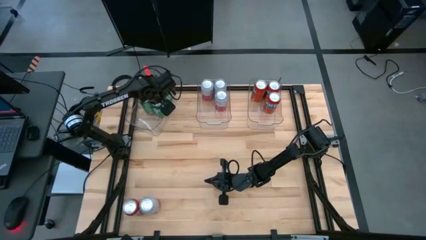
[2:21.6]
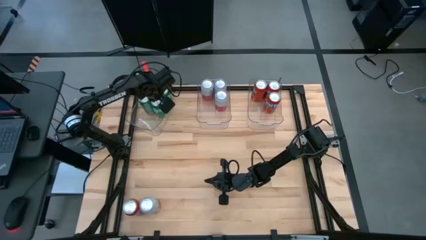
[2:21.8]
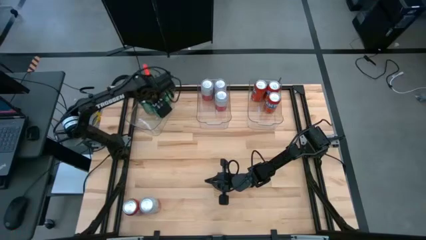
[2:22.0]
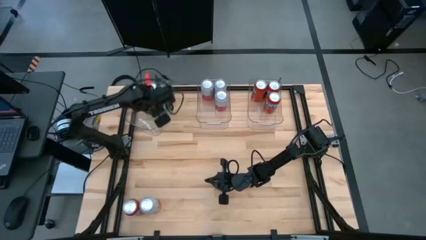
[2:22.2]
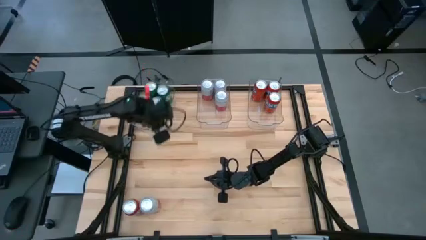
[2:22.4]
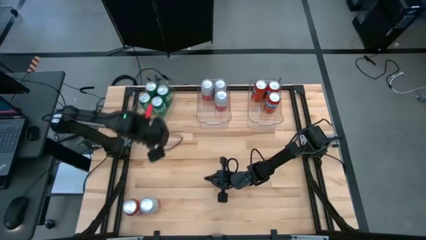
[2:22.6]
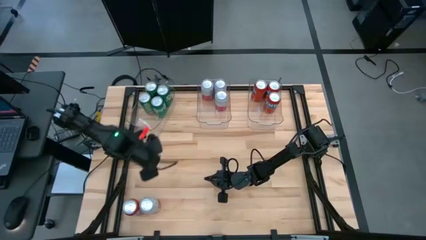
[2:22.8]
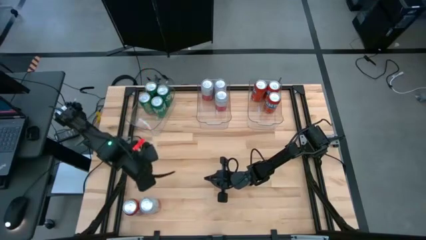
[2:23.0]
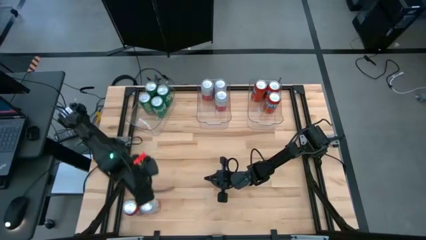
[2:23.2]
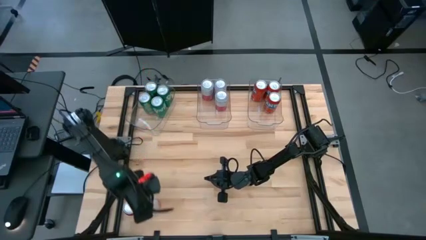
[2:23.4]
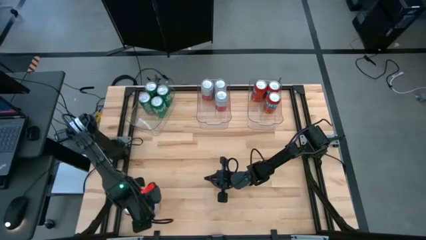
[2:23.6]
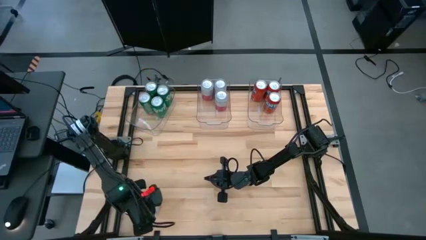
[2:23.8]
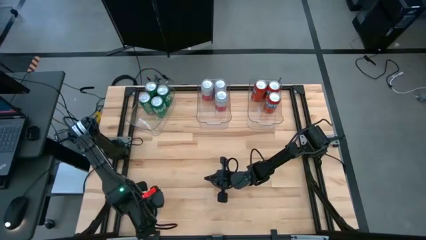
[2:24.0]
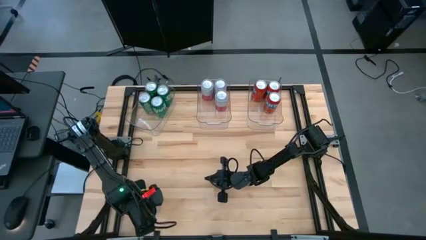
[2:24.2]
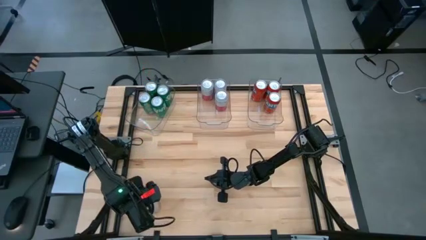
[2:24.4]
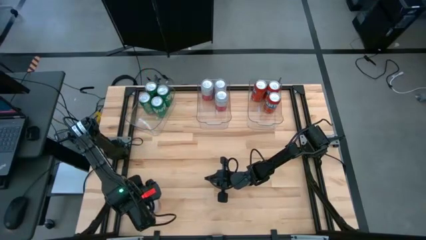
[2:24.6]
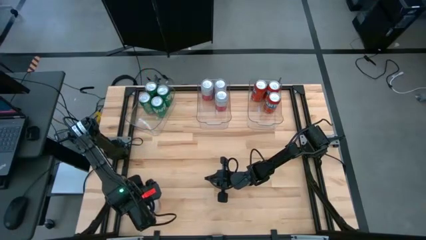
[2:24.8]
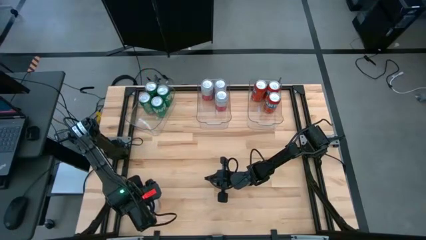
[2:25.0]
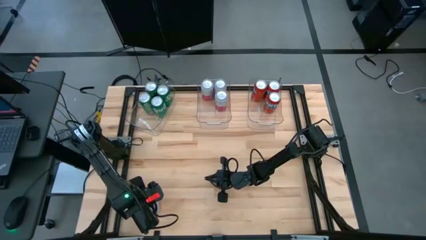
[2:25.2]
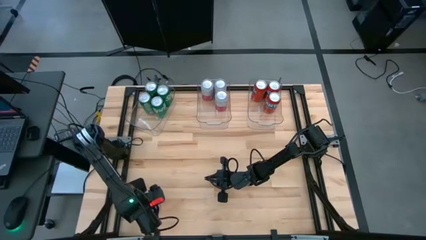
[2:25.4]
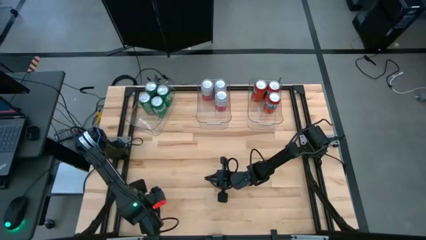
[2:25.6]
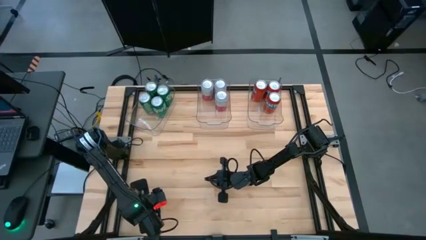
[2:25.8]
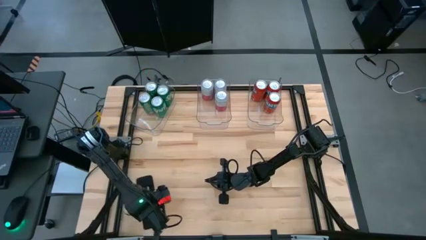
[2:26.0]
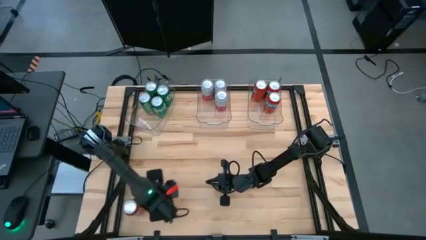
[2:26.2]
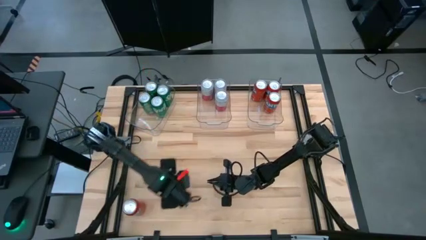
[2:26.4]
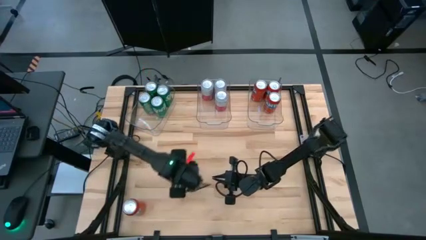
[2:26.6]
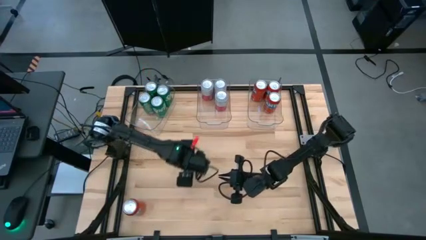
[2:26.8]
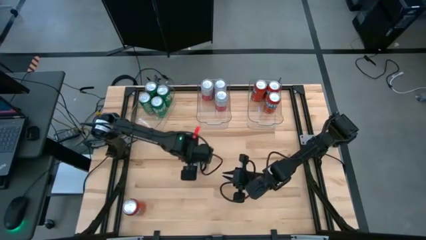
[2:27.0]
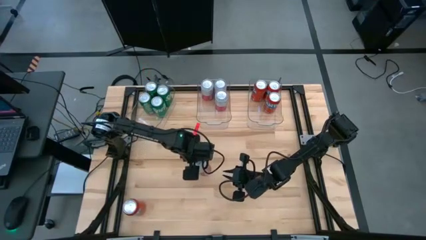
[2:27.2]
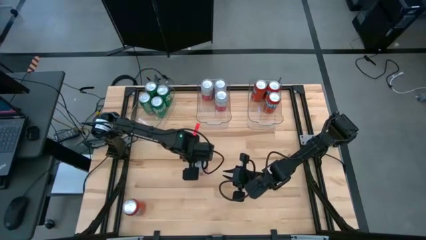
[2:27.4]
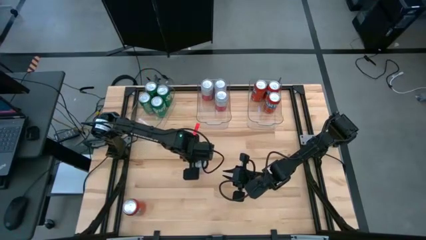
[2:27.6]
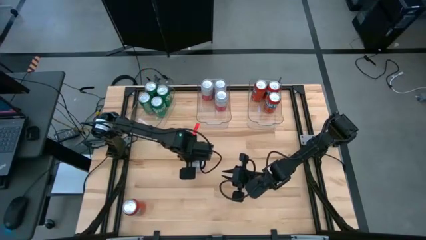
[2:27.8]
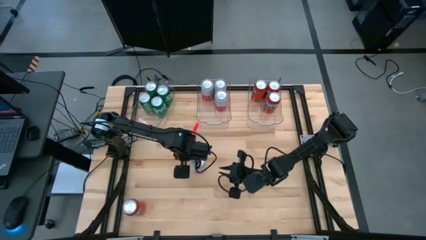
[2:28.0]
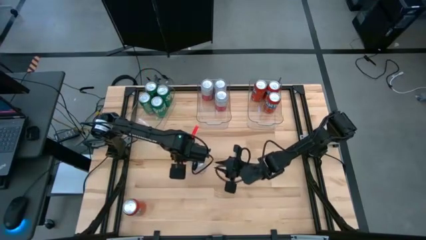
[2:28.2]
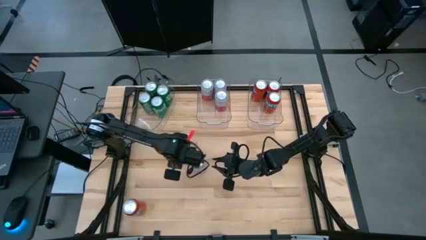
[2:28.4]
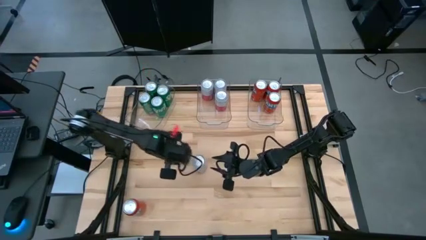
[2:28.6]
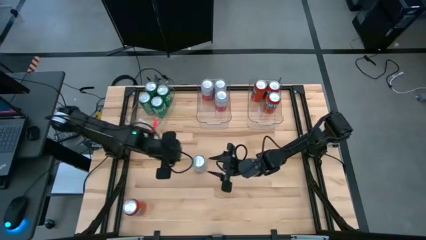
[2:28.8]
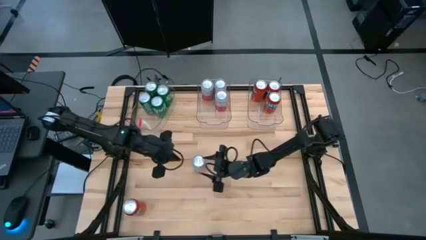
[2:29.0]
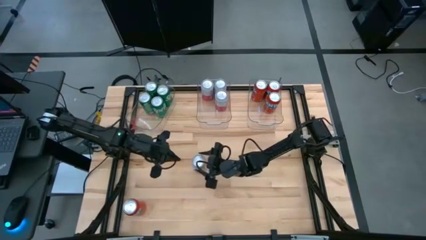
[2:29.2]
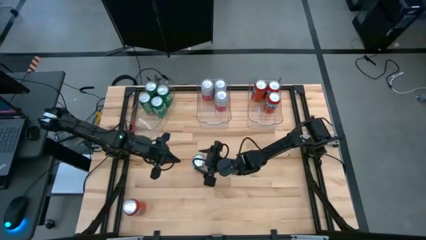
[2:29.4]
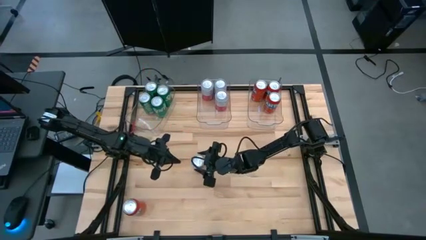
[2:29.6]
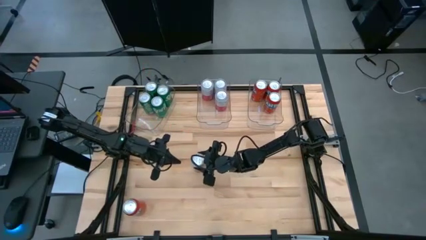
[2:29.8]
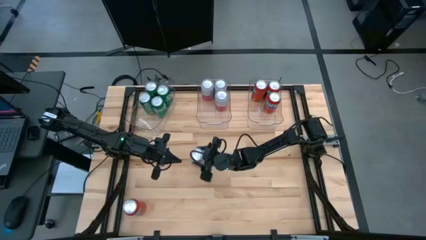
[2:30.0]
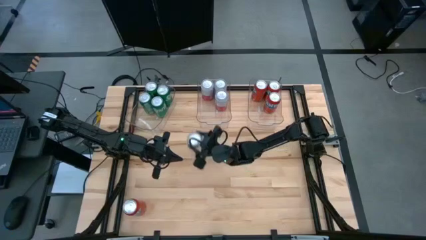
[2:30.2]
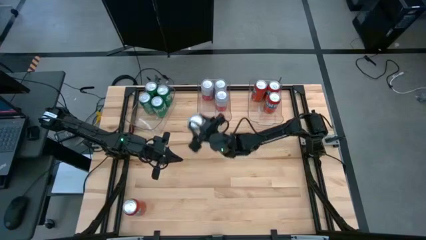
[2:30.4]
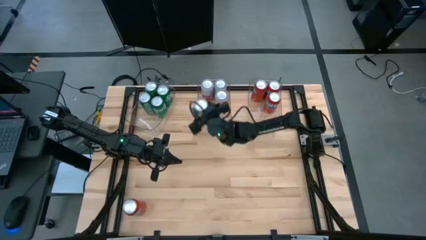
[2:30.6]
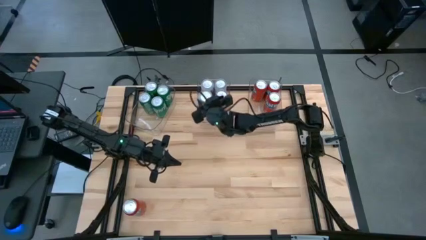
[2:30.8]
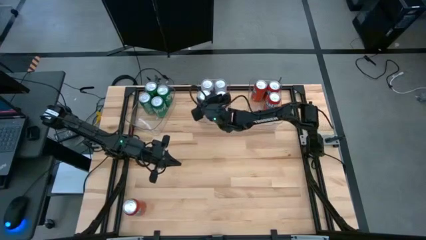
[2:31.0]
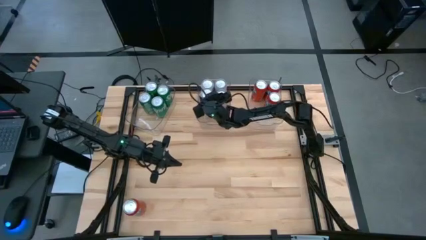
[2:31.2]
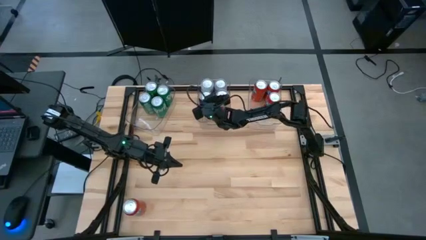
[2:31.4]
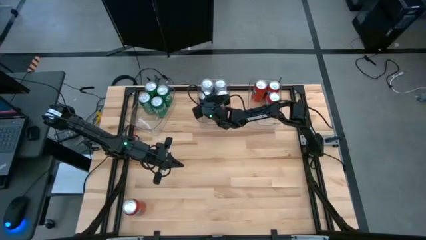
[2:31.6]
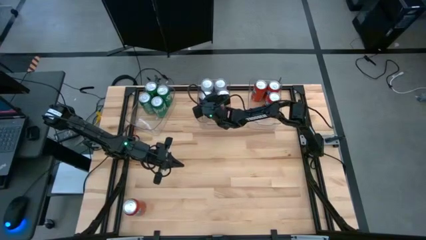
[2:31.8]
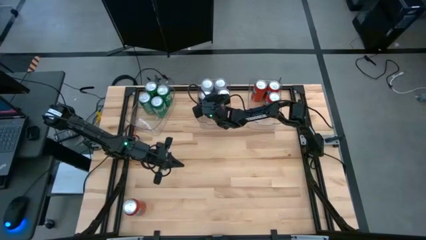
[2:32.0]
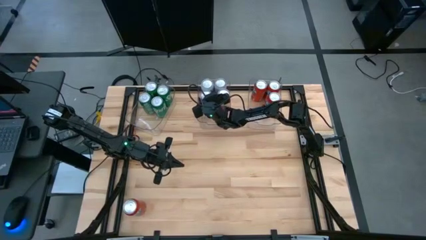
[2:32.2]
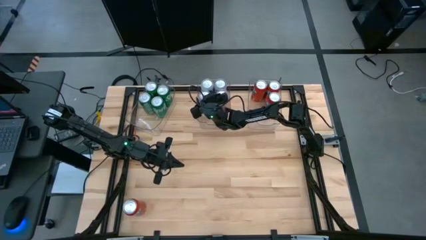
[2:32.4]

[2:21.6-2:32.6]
Task: Sort soda cans
Put the pink-white soda can into the middle transparent bin

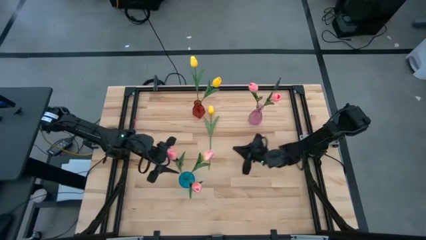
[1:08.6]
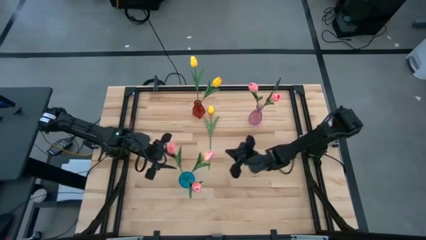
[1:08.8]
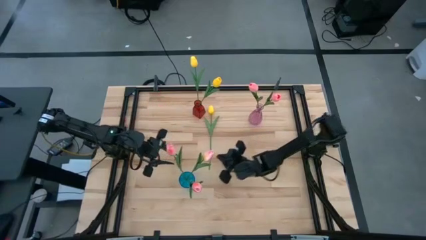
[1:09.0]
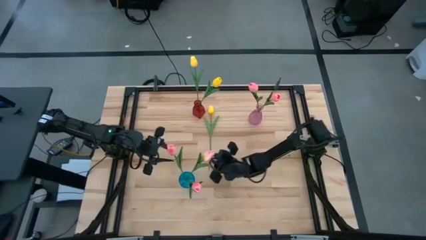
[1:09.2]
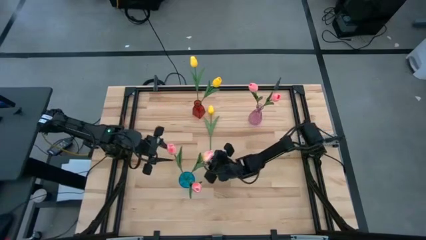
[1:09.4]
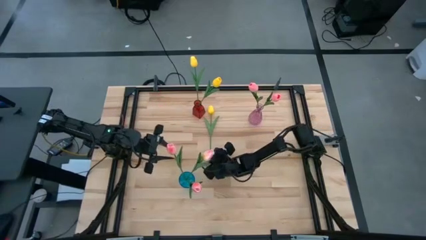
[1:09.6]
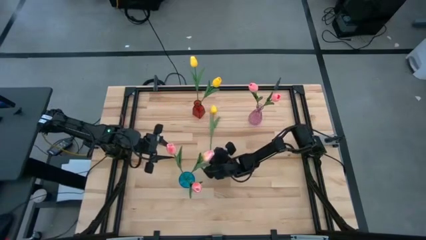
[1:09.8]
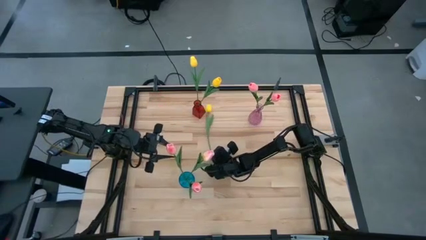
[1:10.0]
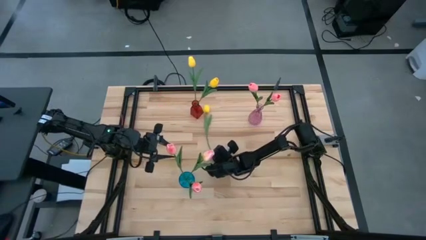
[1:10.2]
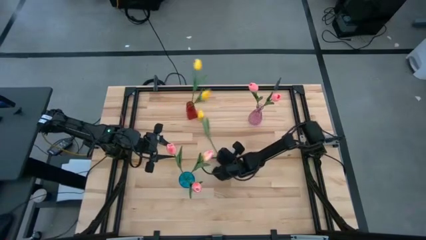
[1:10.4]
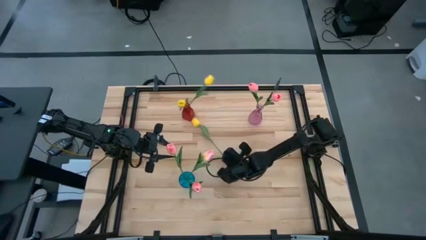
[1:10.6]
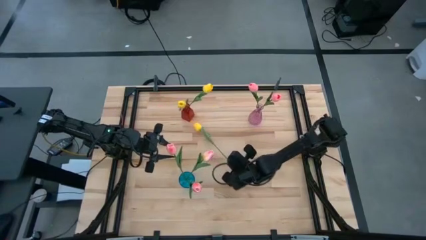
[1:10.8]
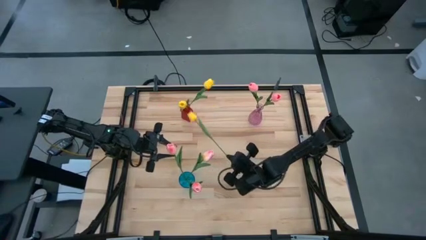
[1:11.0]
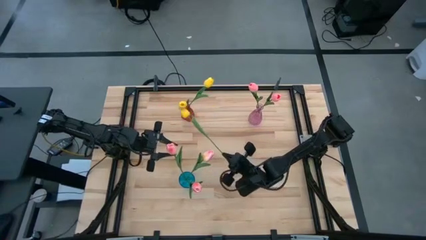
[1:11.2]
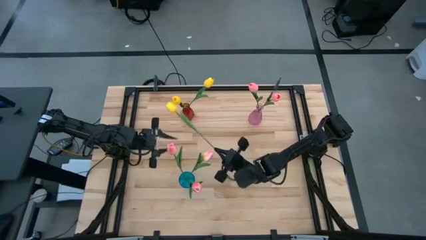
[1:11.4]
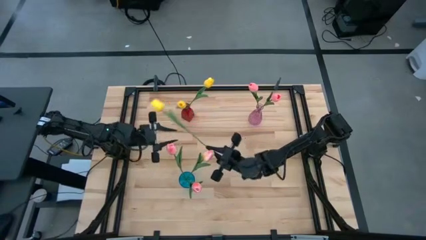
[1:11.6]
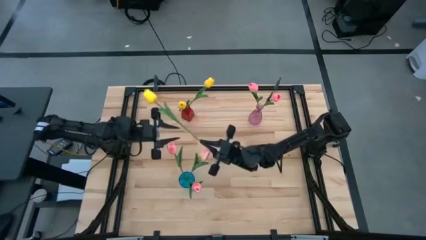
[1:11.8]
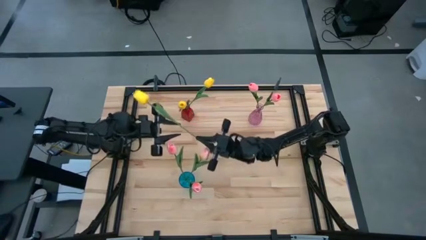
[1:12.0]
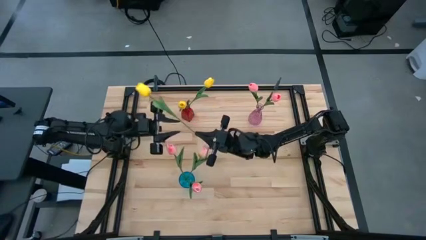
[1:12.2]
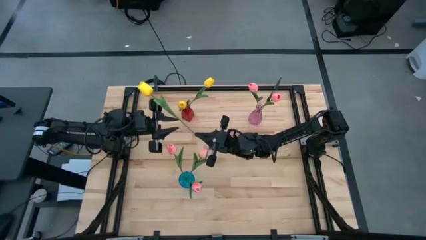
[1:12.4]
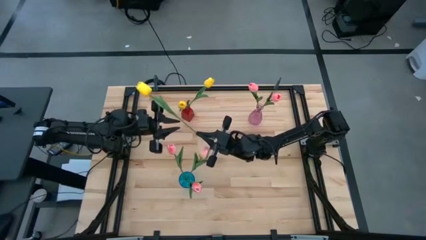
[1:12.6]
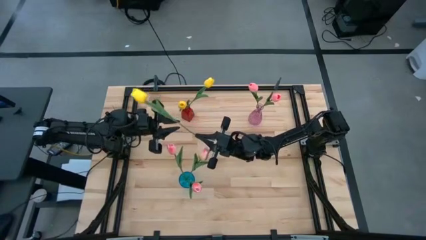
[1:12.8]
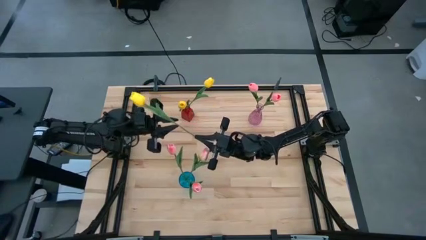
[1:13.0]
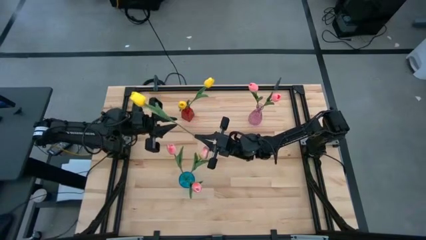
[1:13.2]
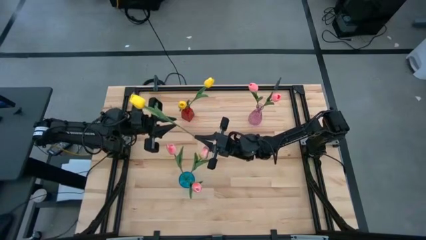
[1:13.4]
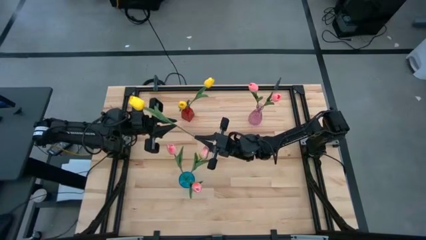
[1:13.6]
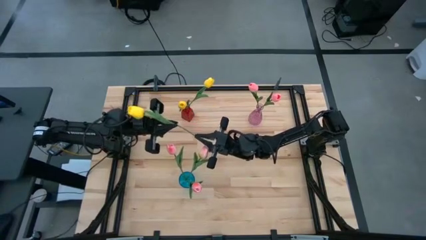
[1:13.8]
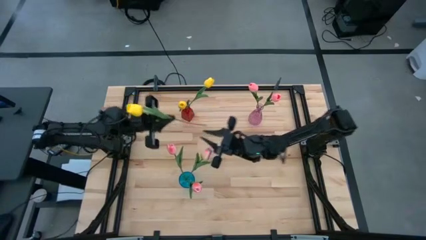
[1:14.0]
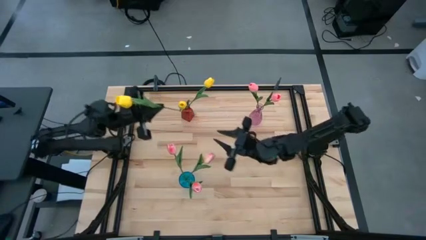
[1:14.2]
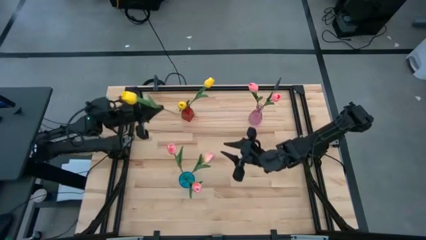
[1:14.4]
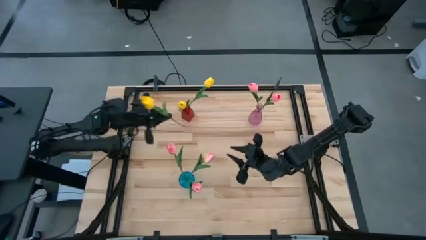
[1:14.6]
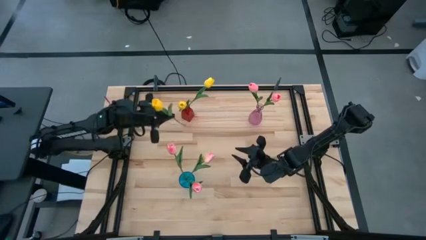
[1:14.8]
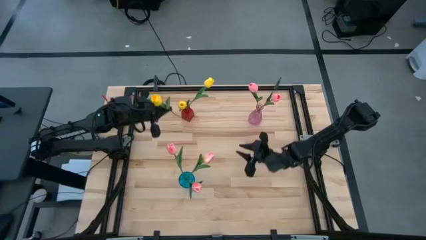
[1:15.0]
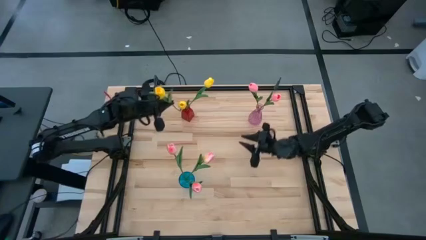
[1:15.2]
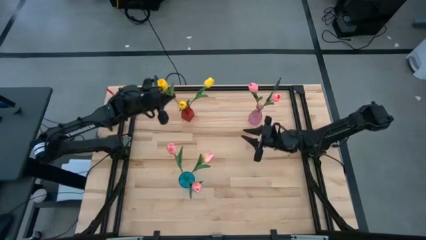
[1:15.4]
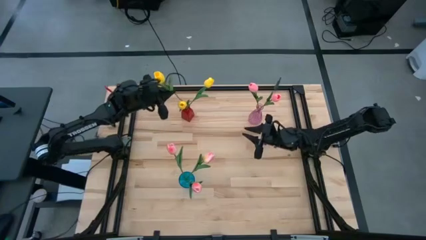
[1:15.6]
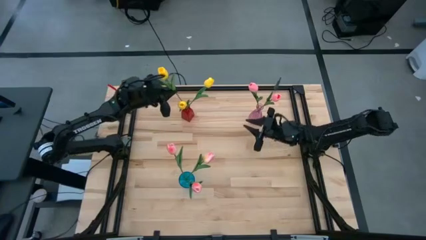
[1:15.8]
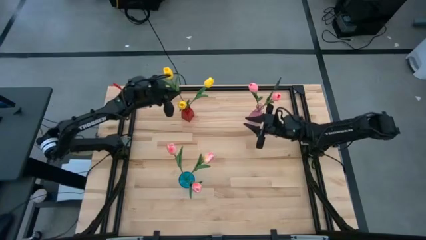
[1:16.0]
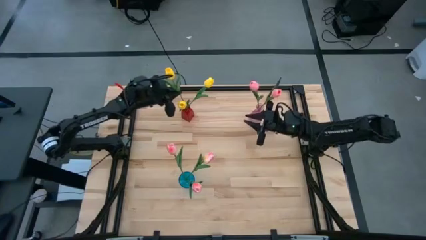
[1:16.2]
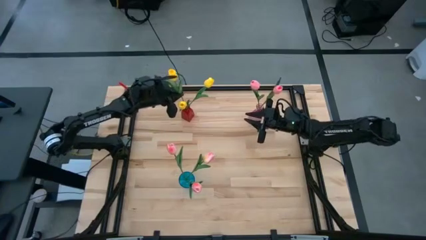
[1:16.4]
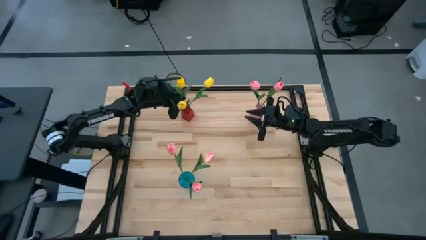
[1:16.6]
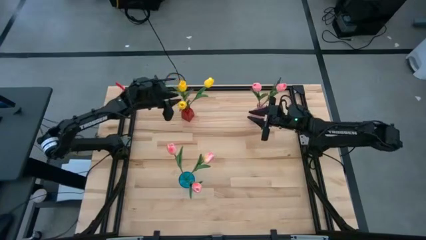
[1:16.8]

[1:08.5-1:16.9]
Task: Sort flowers into vase by color
Put the yellow tulip into the red flower vase
